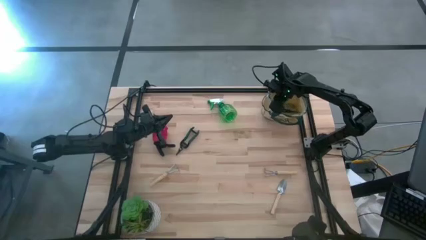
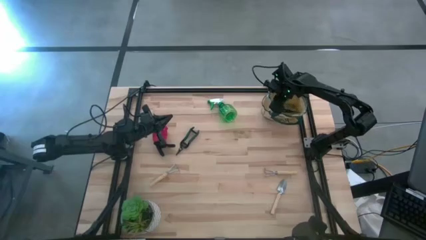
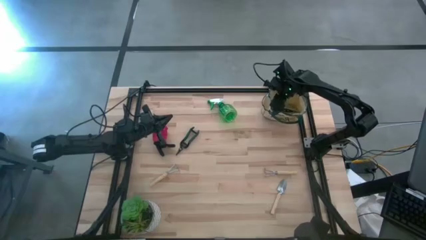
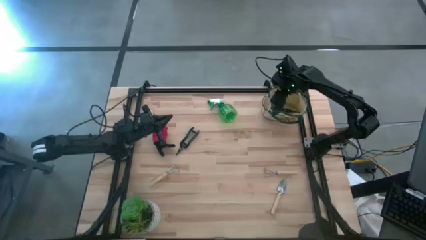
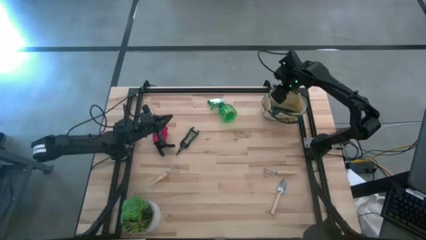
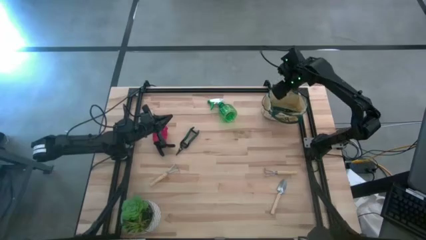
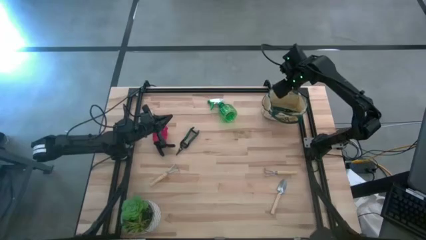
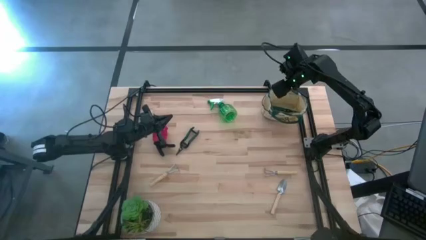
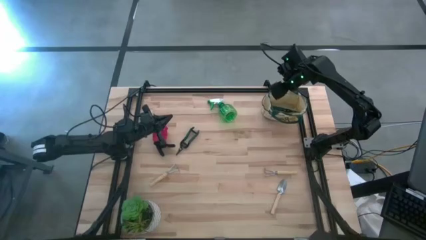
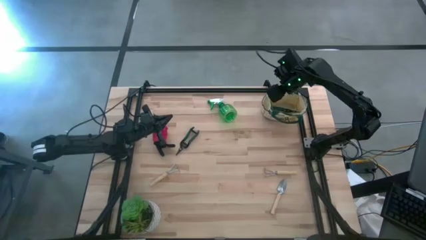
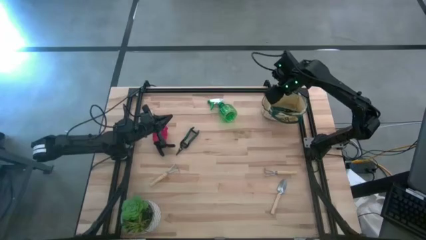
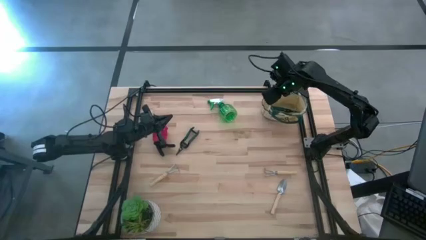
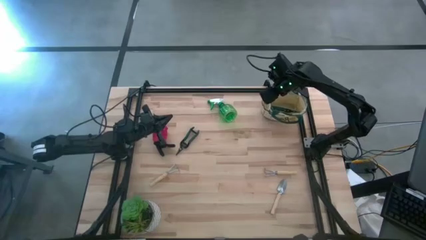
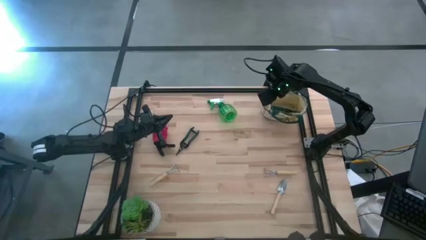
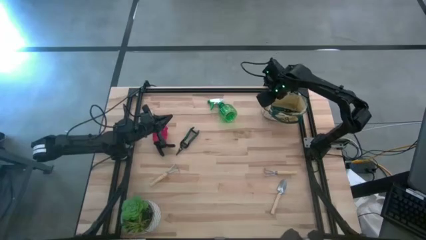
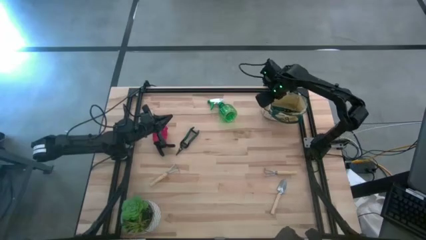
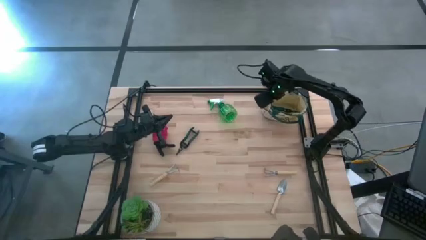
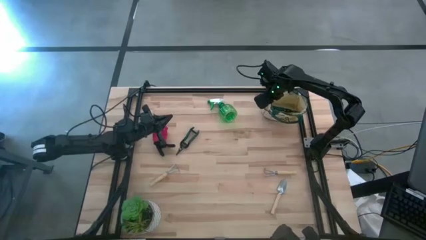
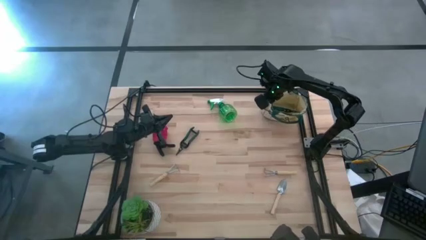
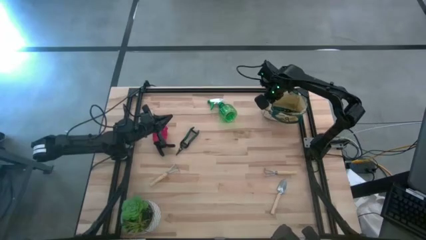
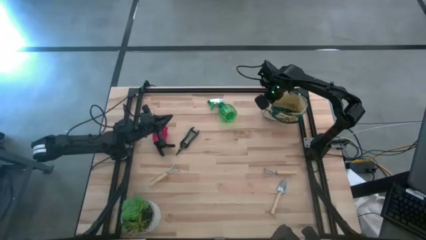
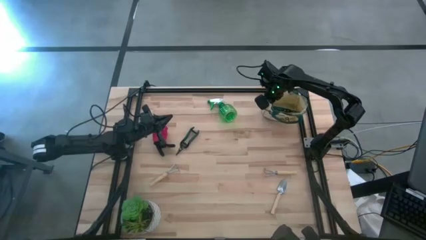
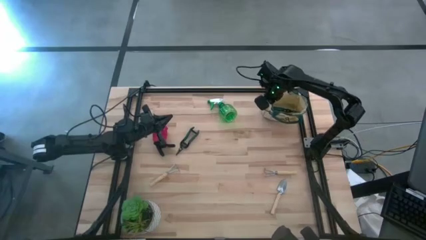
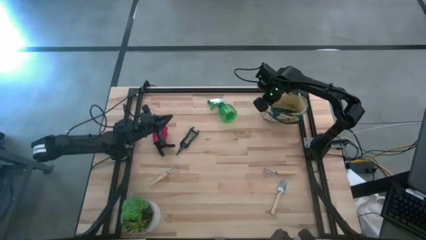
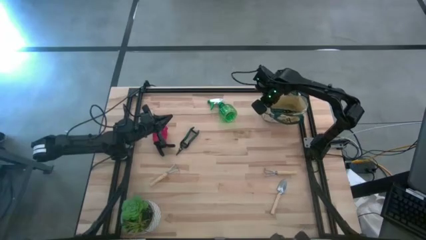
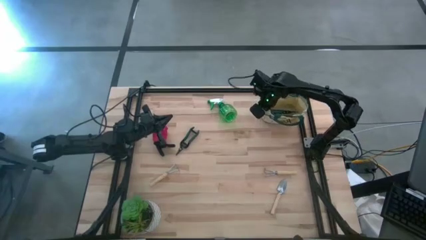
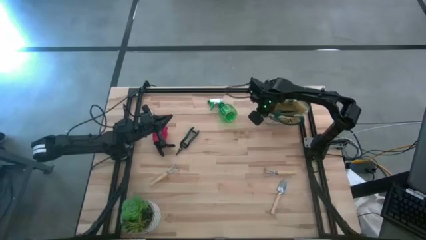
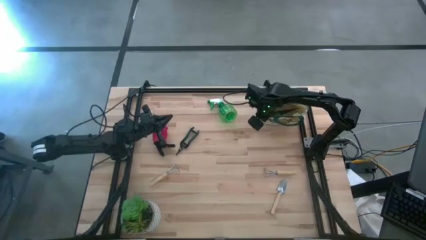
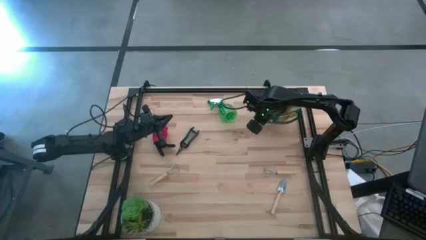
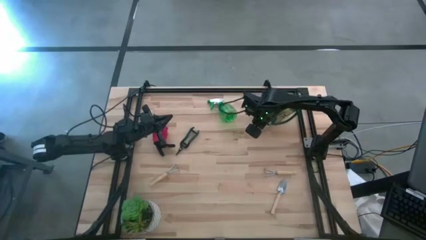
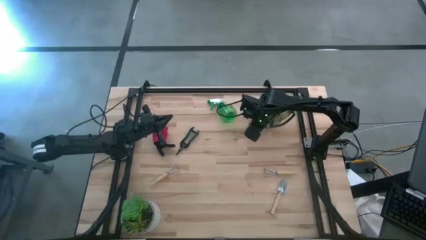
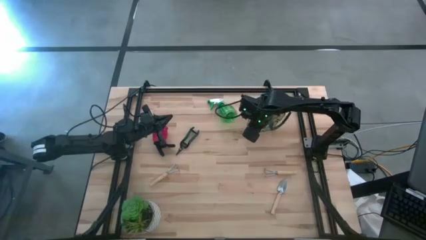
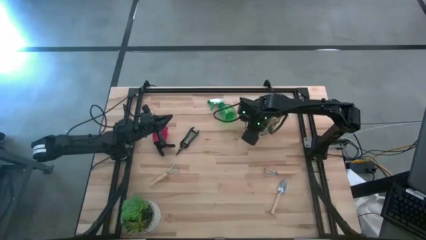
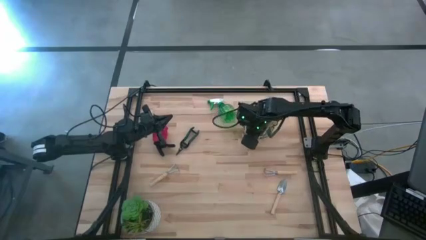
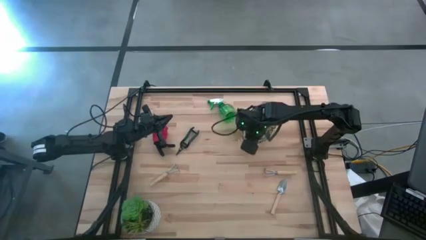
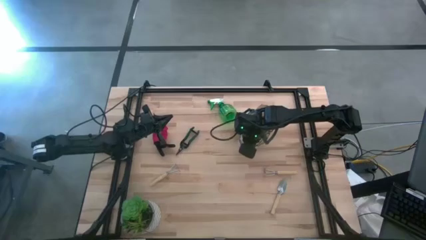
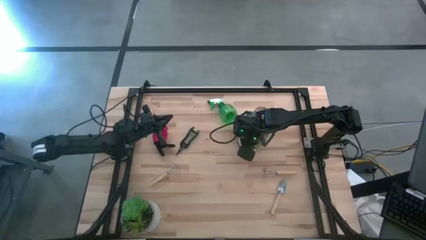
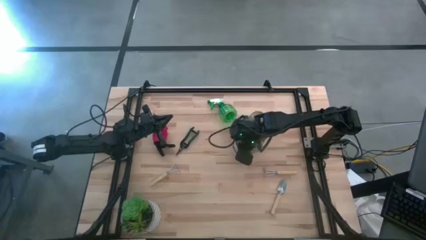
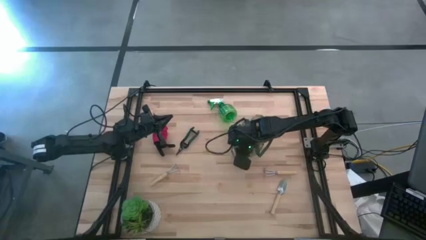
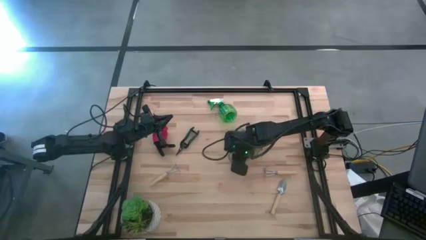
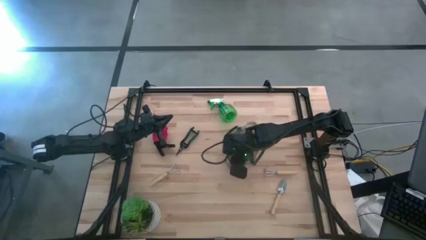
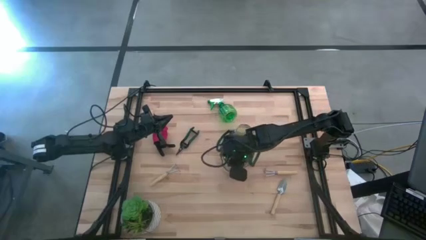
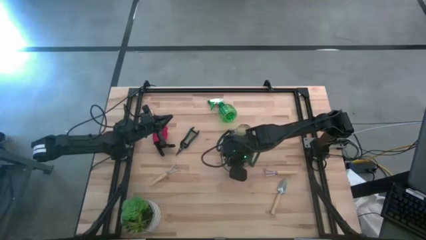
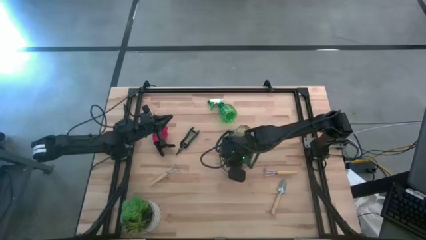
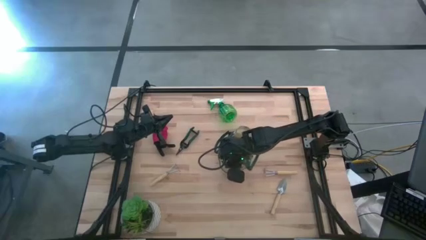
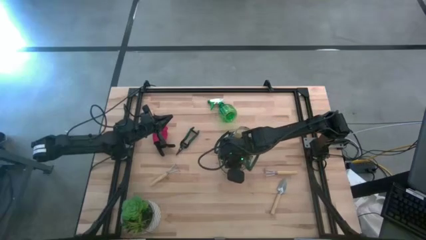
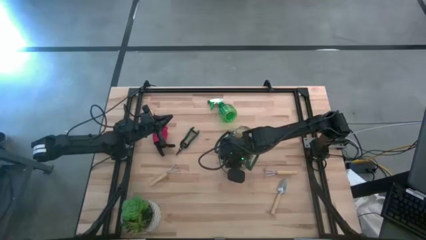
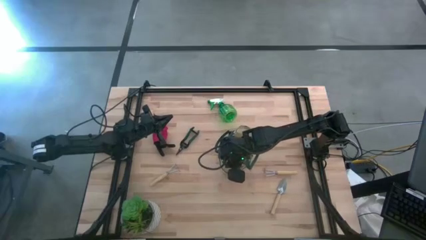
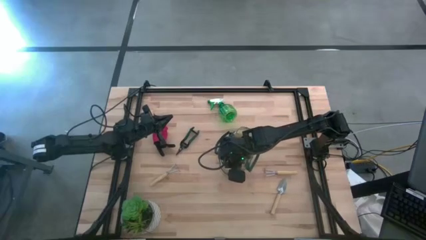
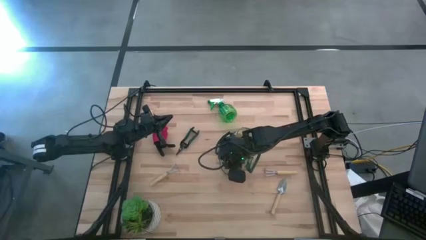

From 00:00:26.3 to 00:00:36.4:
Task: Pick & Place Garden tools in Gardening bag
Adjust the gardening bag
